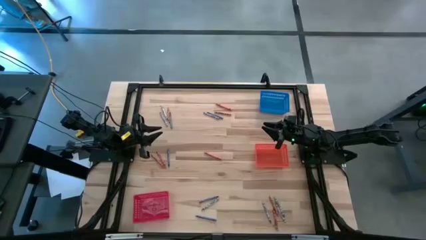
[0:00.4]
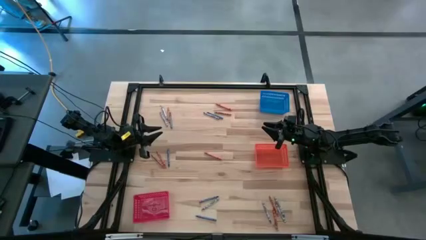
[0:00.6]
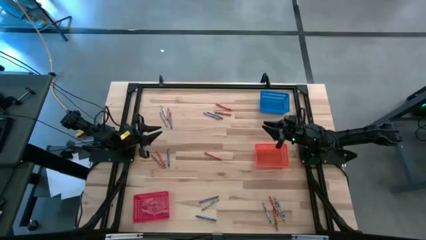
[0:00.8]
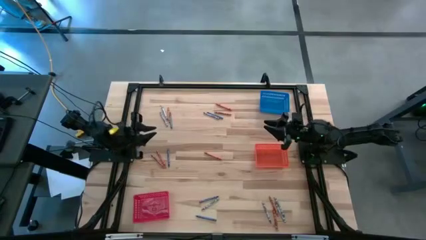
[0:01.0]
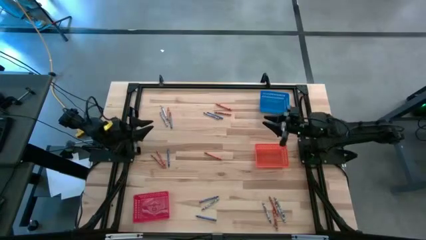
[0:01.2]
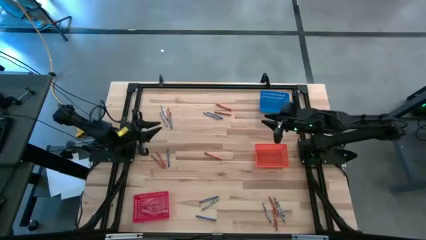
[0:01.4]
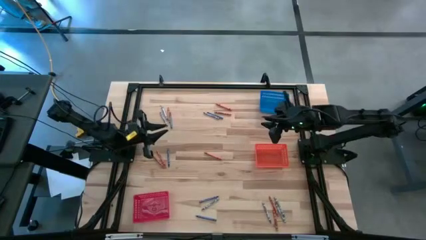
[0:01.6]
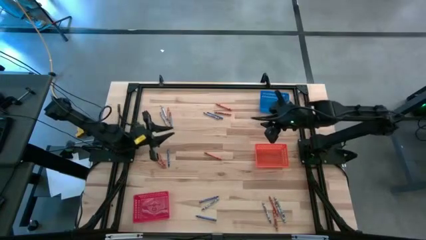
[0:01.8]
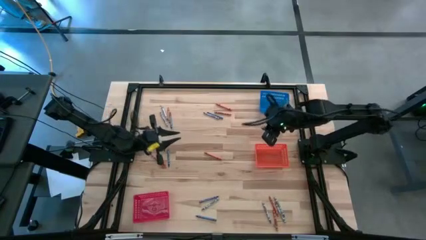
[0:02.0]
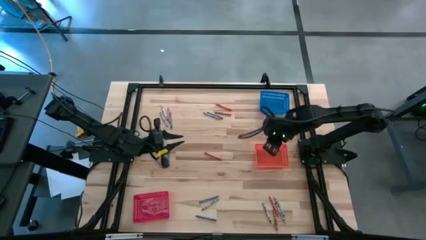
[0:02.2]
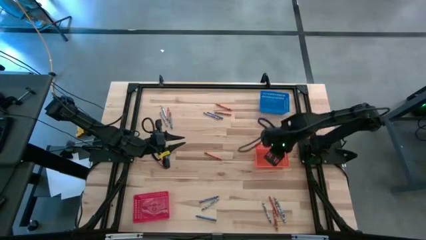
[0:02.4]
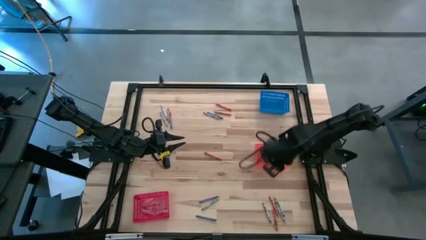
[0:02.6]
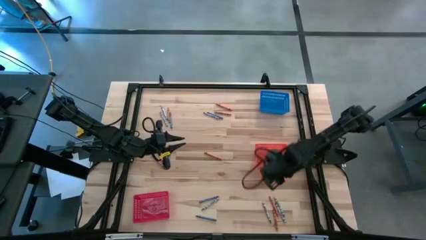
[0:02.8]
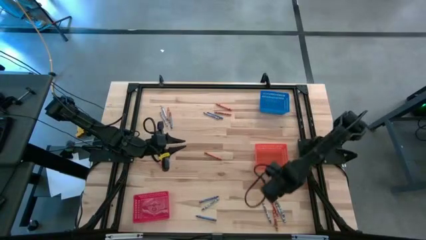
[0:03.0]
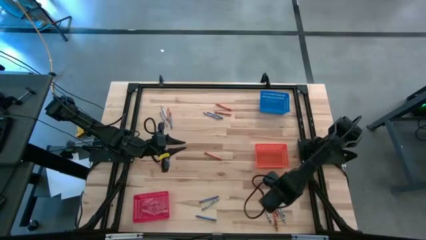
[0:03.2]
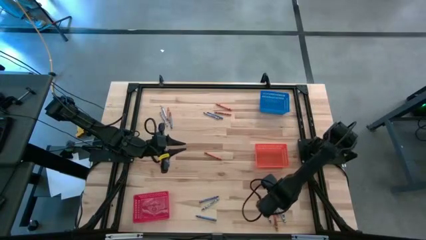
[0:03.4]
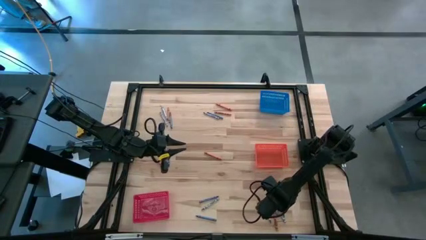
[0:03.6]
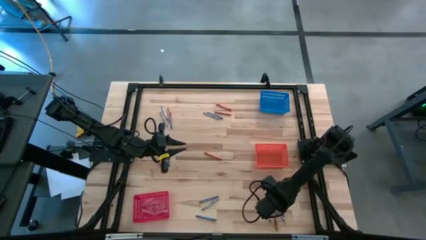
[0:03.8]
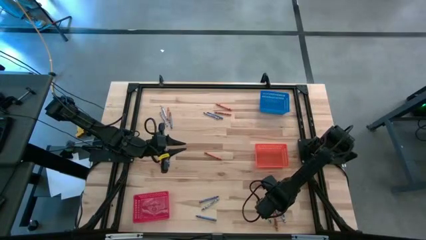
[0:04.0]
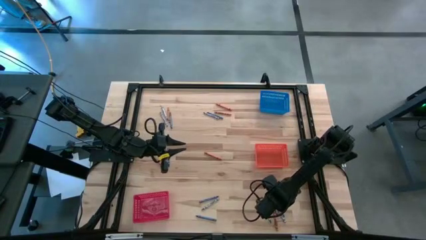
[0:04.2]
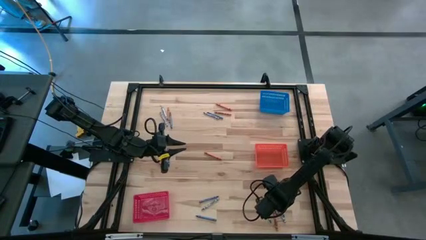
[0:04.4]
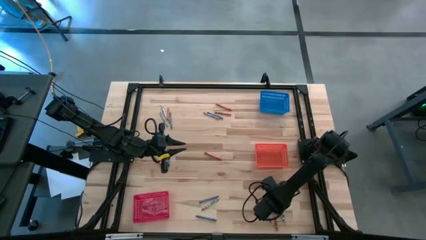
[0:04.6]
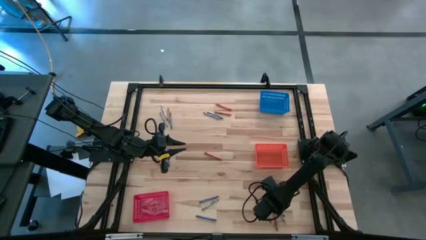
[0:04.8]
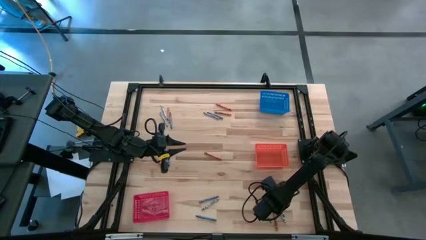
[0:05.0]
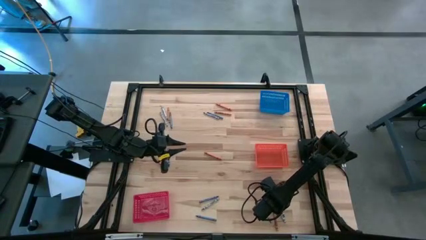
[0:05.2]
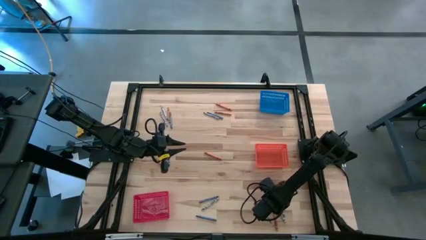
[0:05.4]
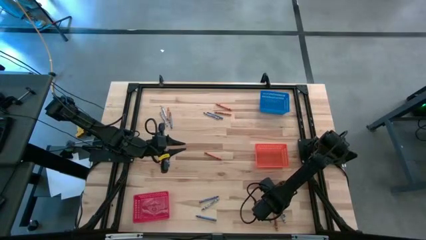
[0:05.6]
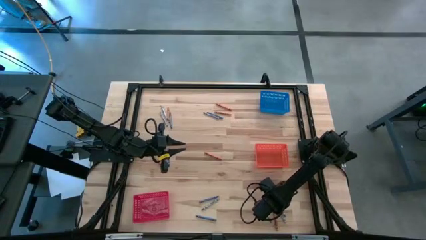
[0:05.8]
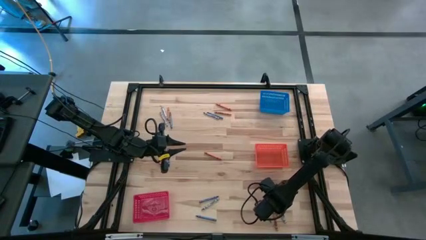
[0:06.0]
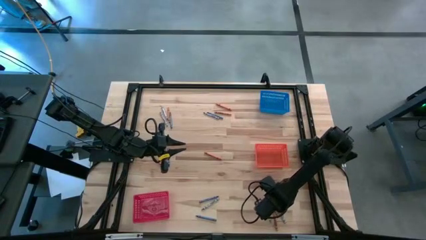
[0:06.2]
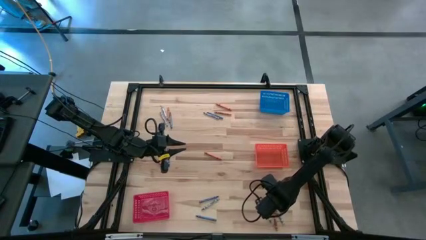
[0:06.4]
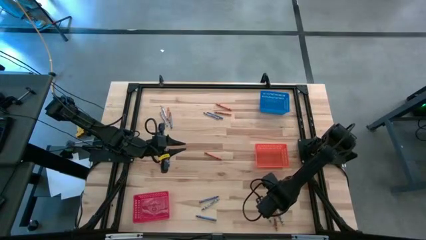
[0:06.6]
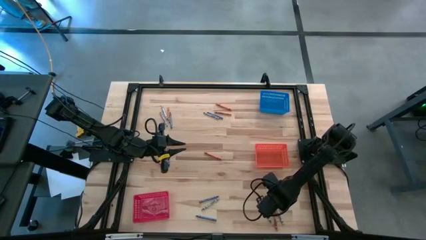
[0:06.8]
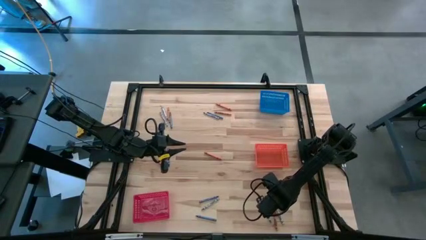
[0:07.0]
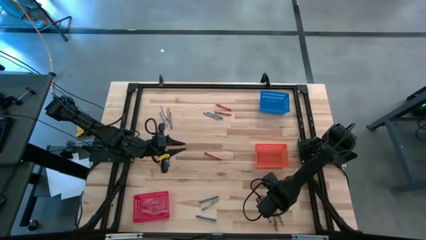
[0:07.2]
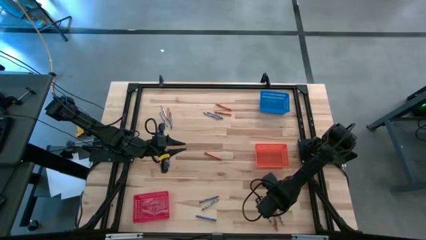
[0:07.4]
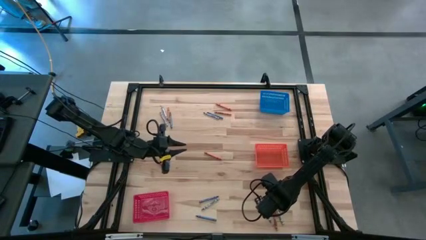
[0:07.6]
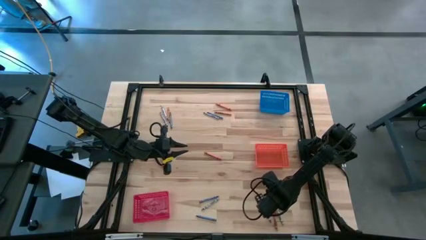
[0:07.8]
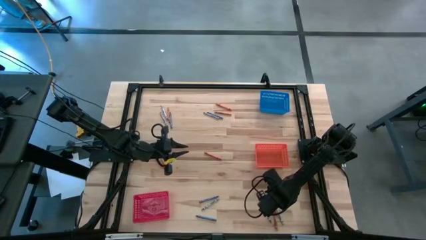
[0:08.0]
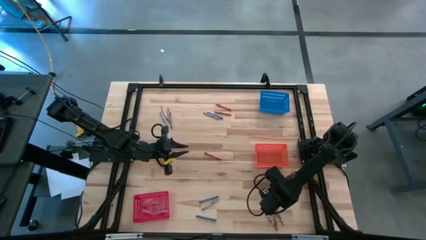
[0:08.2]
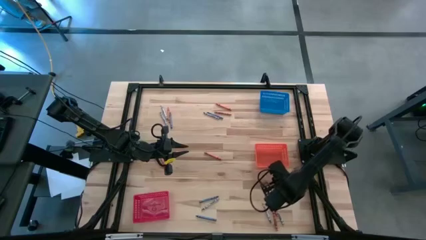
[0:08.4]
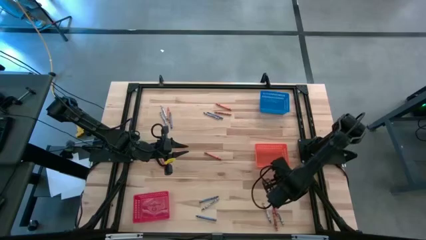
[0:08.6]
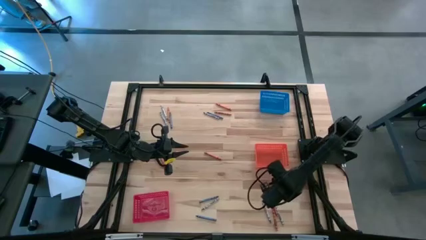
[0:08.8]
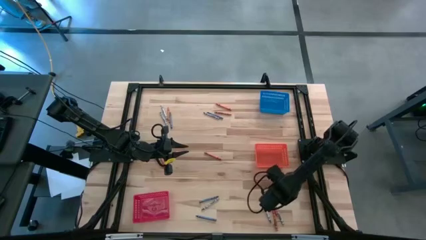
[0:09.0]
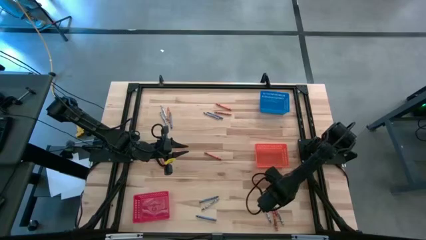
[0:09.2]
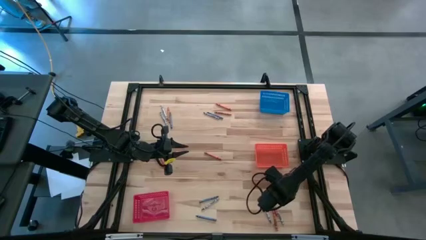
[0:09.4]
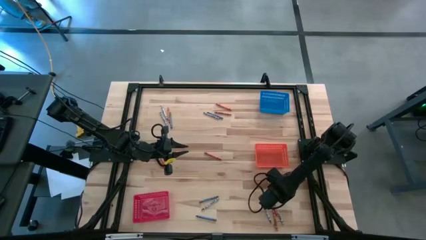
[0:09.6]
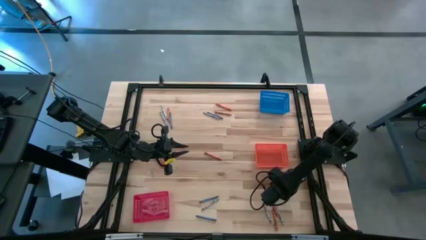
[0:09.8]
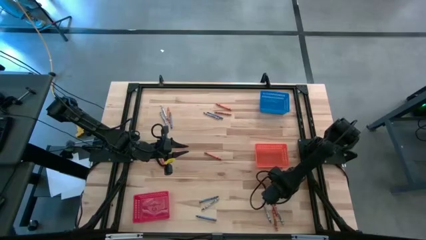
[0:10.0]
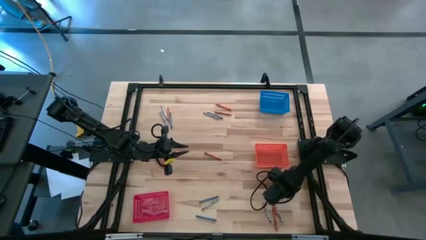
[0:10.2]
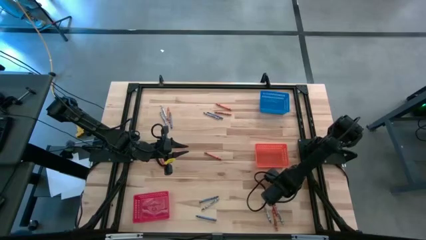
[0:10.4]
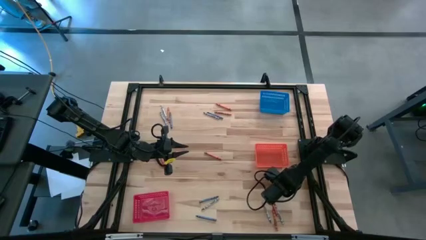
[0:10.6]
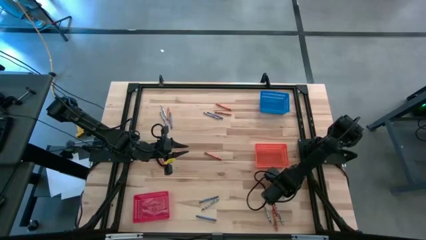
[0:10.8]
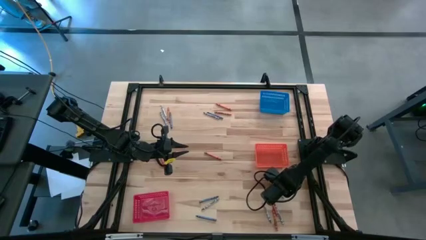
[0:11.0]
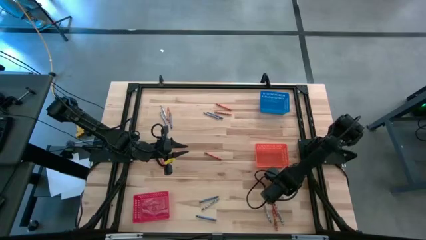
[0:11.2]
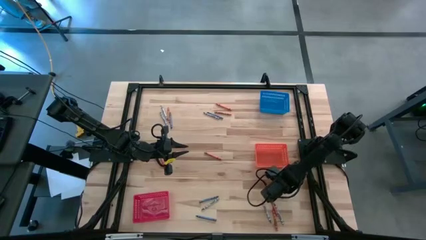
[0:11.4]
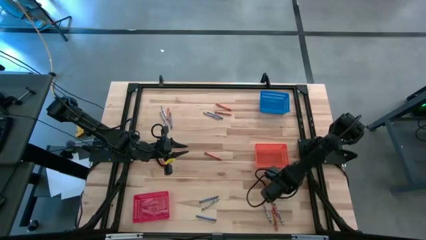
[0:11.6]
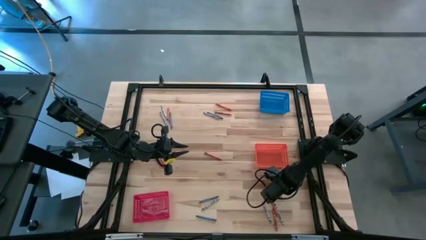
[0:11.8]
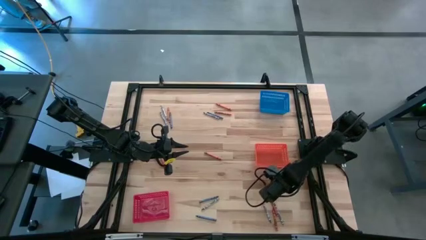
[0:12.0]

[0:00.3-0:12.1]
Task: Sort crayons
Put the gray crayon into the blue bin

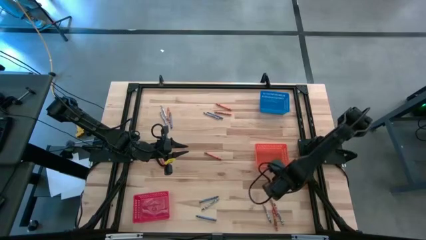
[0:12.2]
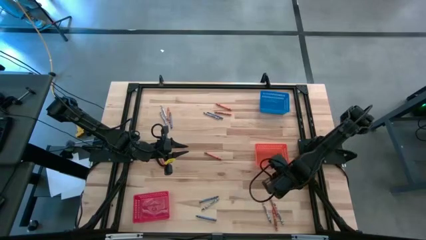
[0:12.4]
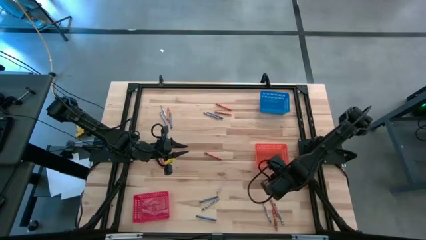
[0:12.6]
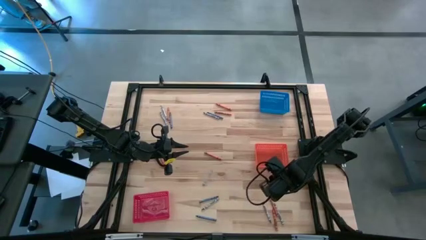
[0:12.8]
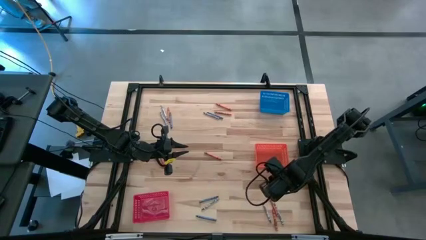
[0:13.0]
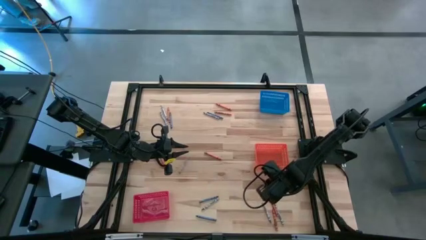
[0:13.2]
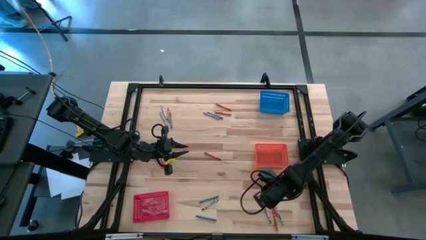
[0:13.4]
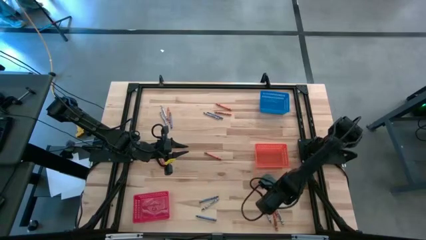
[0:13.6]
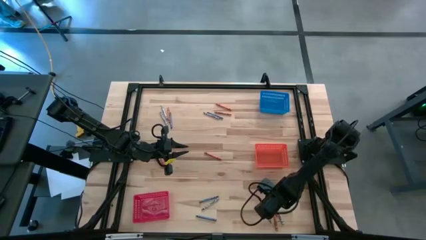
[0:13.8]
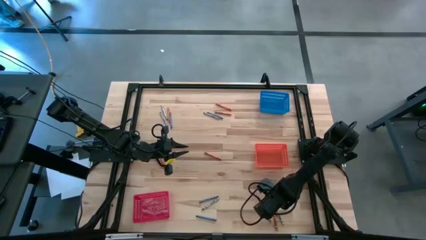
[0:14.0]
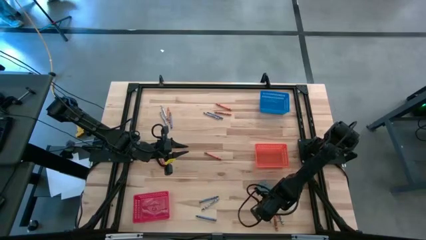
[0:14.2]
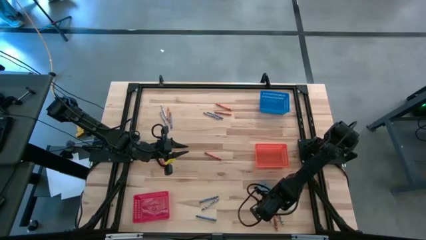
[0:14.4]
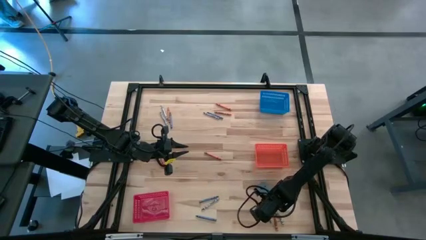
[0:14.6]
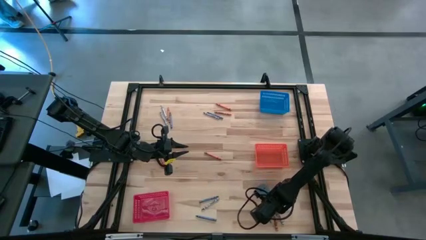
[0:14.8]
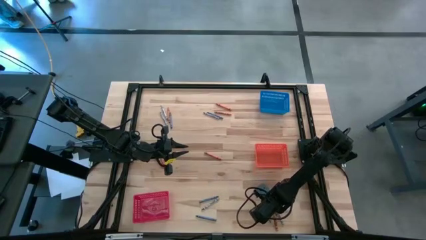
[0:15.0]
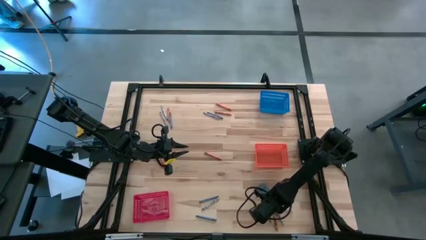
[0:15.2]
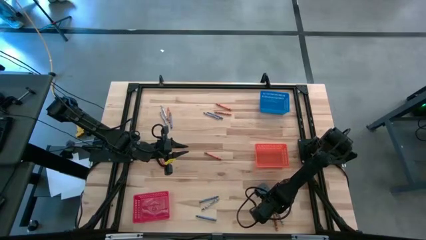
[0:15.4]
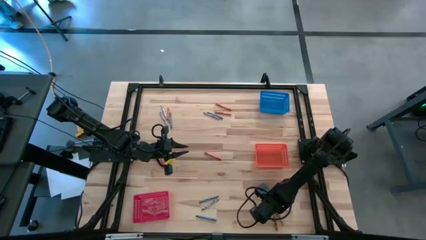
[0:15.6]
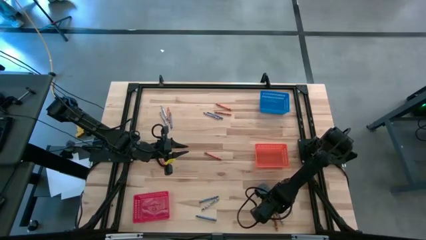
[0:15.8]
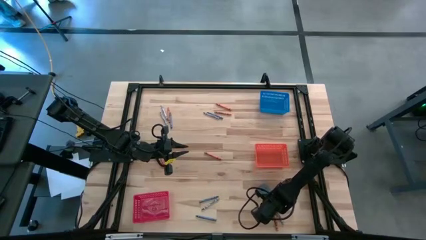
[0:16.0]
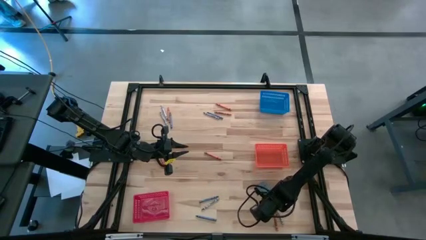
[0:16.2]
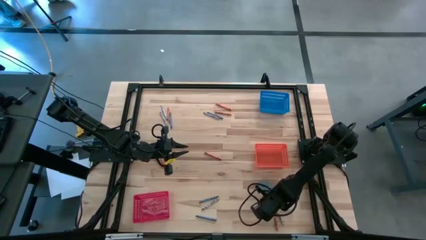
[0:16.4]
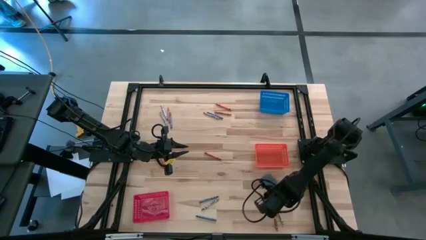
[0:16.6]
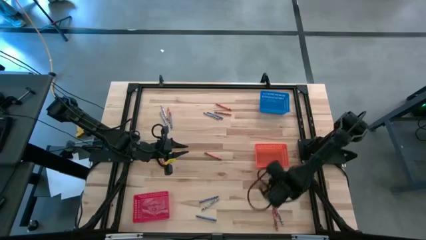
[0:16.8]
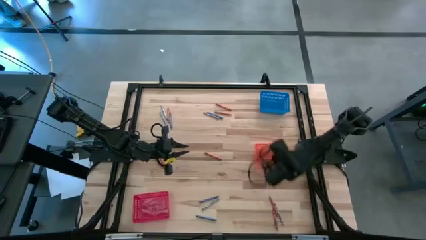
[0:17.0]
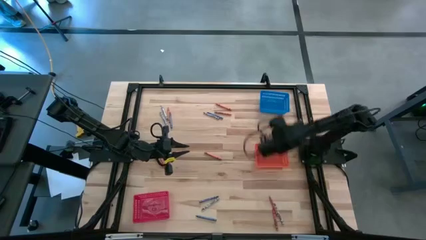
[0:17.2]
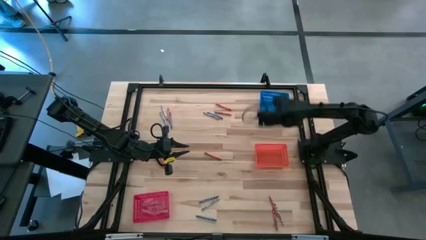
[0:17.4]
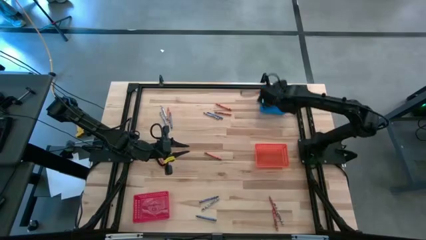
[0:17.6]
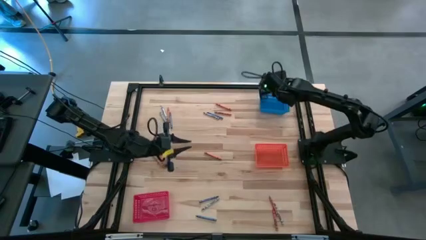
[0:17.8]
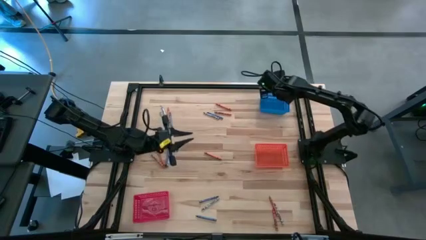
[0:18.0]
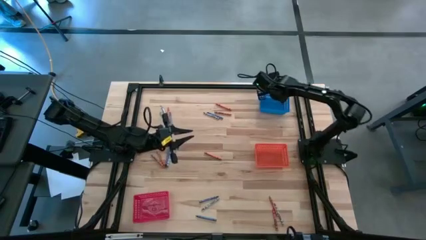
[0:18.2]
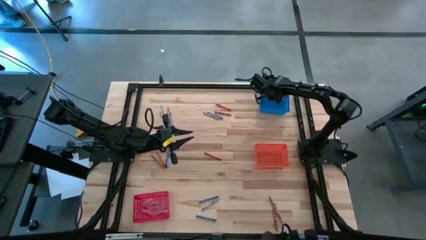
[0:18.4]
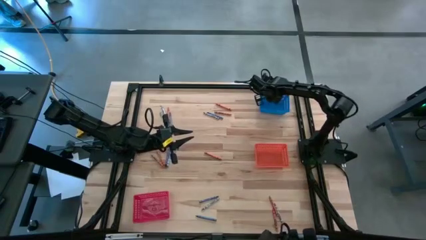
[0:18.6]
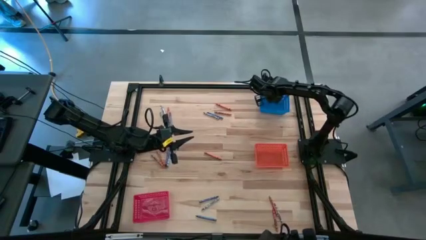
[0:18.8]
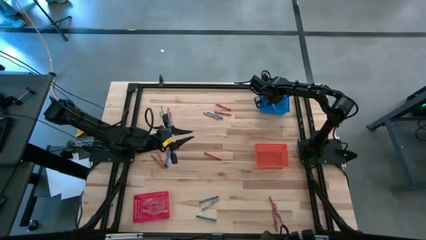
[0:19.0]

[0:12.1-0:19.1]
Put the gray crayon into the blue bin
